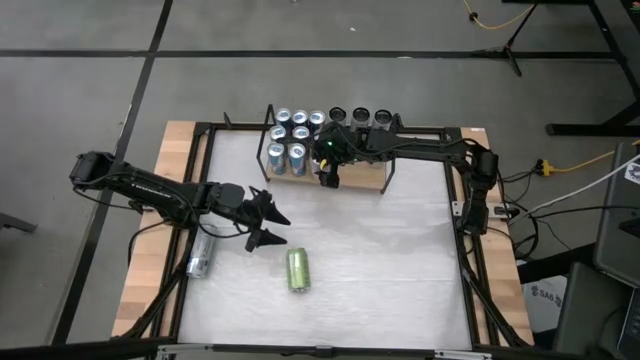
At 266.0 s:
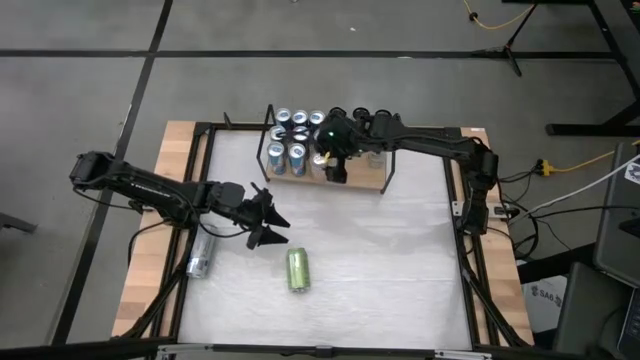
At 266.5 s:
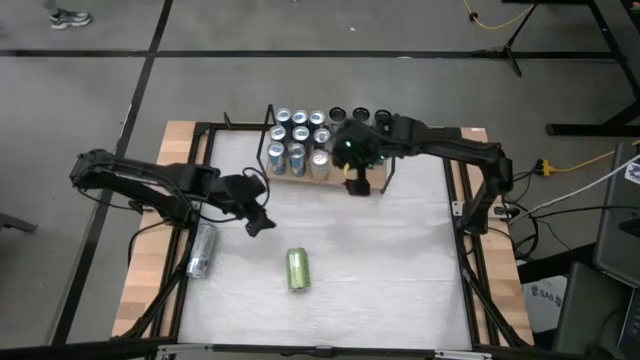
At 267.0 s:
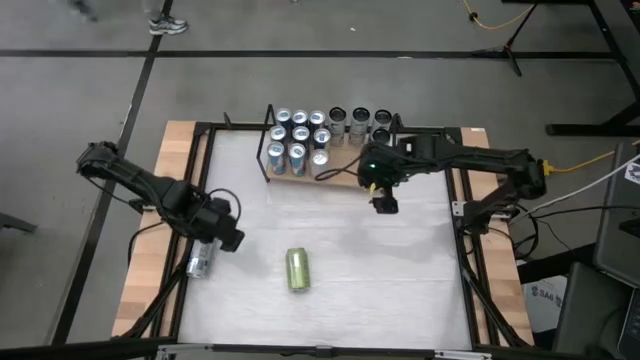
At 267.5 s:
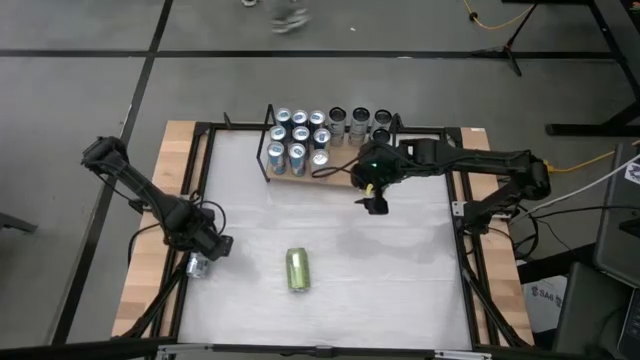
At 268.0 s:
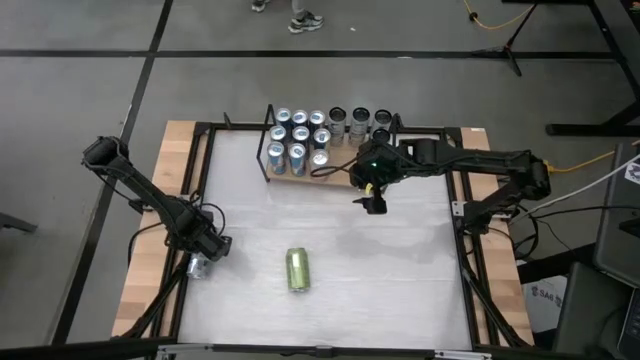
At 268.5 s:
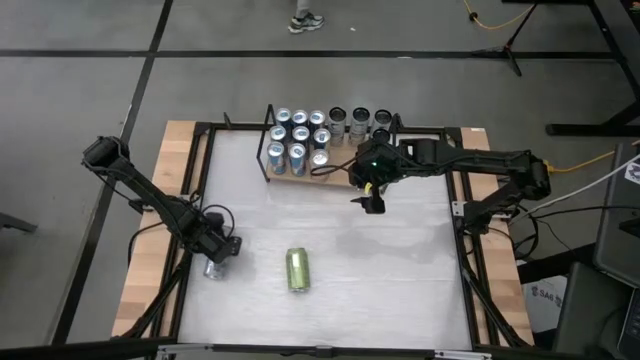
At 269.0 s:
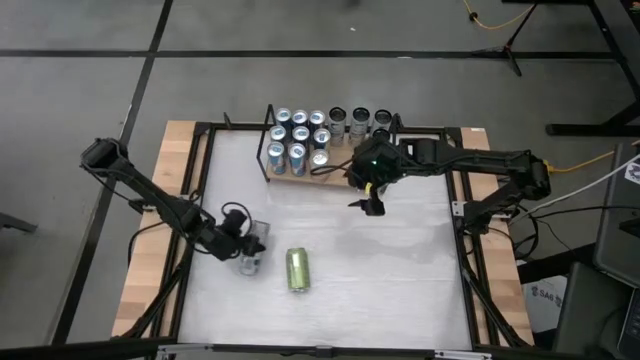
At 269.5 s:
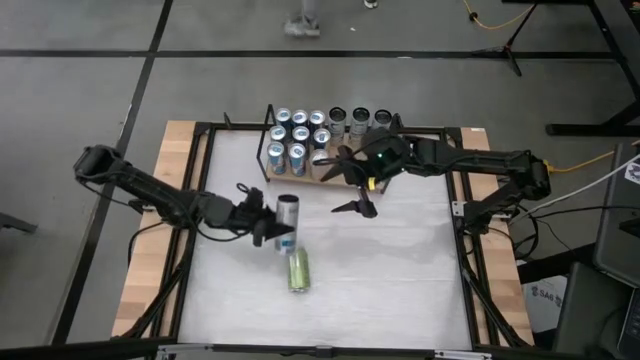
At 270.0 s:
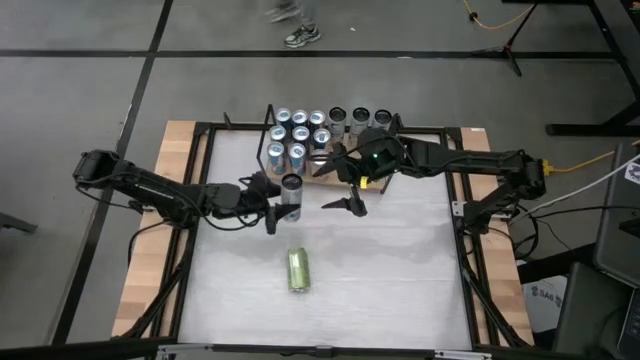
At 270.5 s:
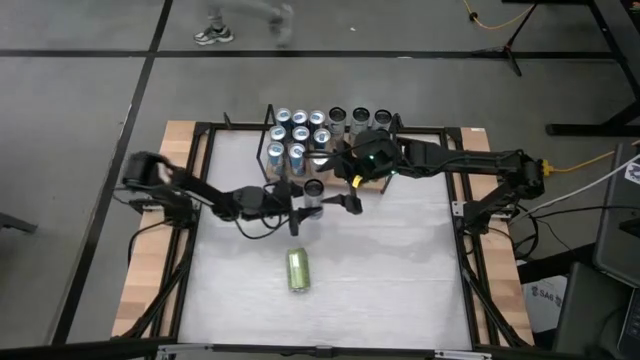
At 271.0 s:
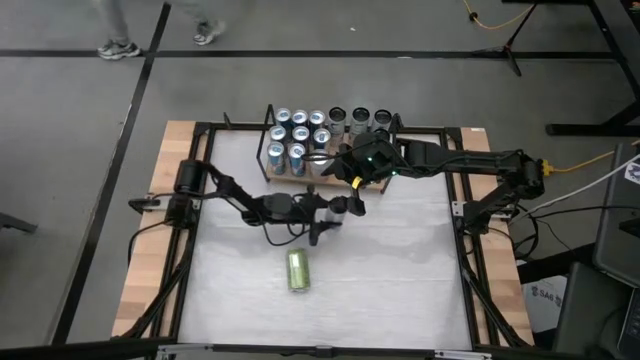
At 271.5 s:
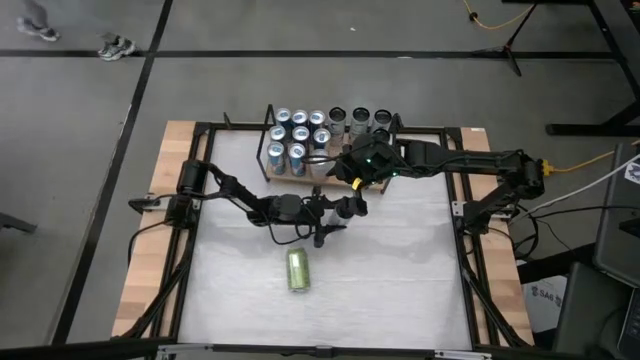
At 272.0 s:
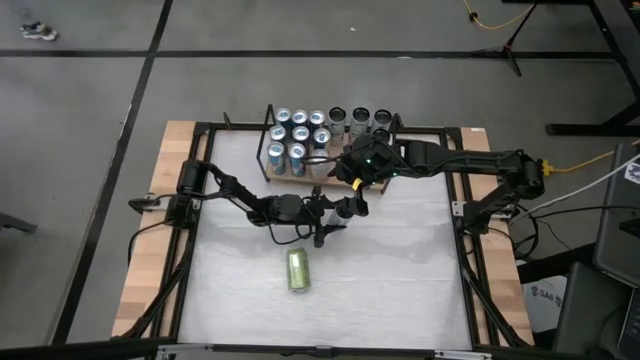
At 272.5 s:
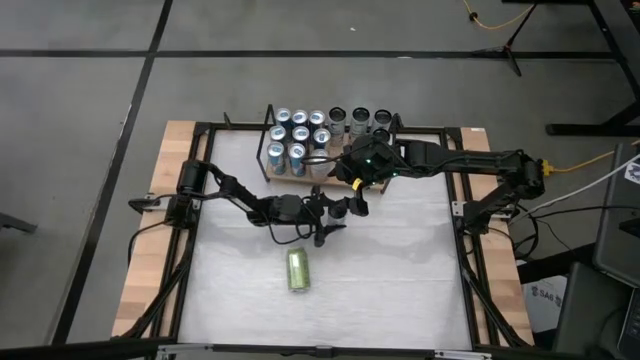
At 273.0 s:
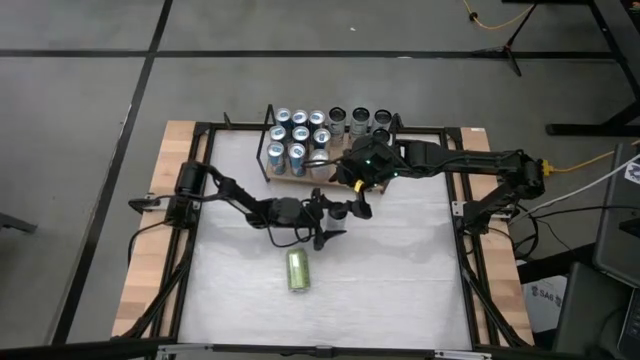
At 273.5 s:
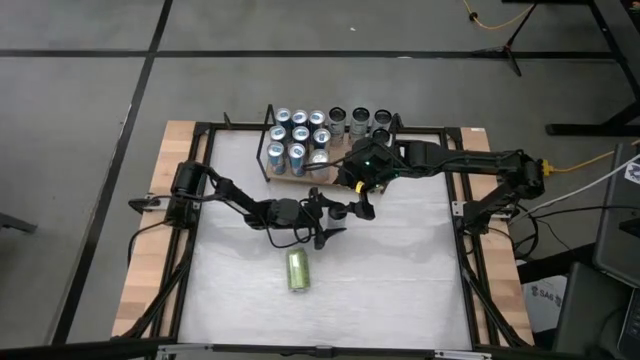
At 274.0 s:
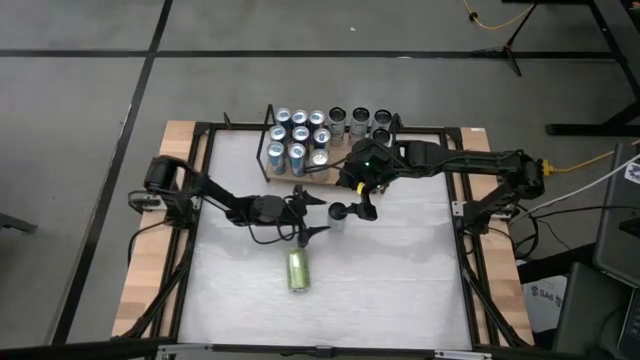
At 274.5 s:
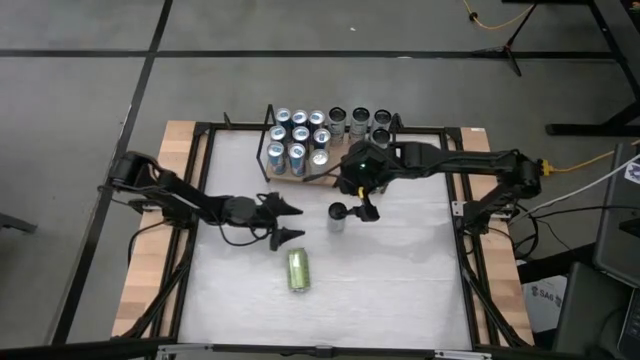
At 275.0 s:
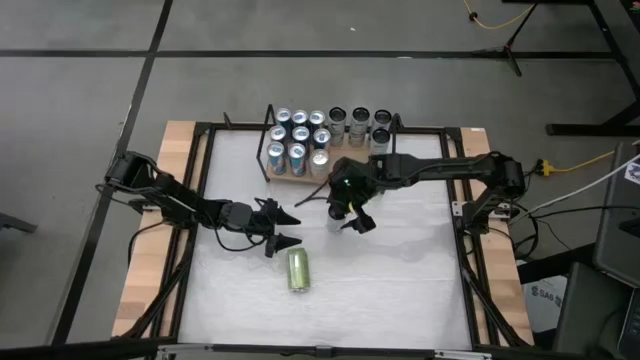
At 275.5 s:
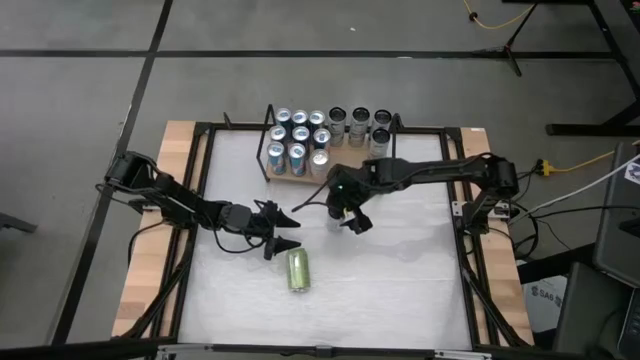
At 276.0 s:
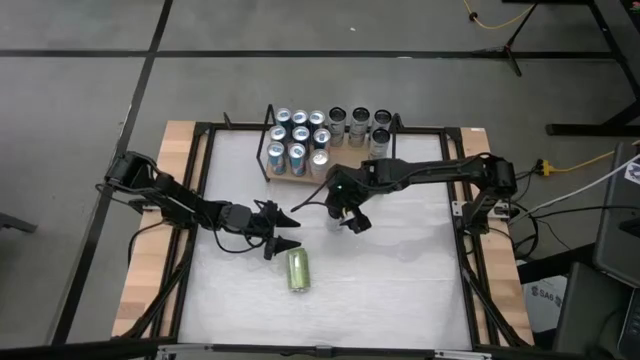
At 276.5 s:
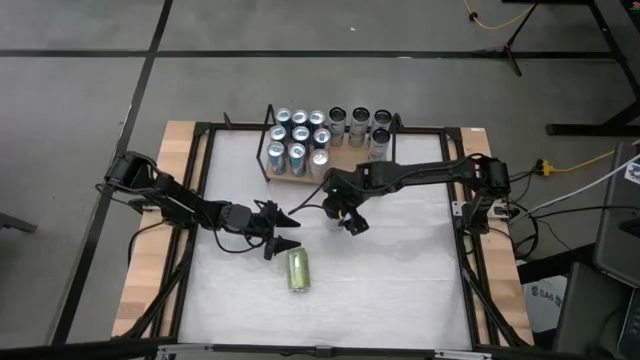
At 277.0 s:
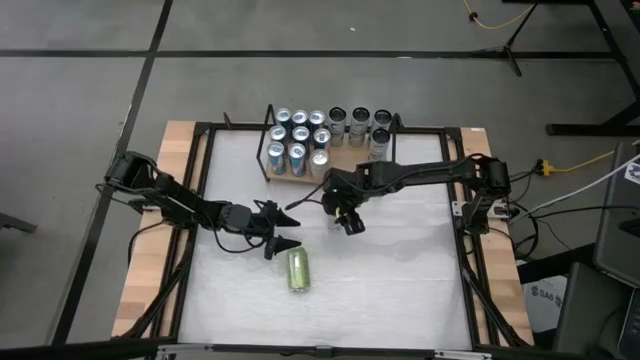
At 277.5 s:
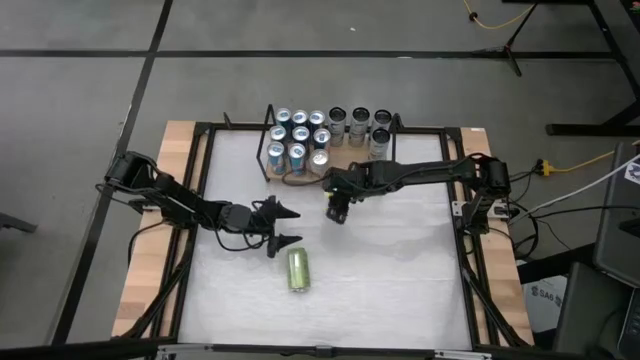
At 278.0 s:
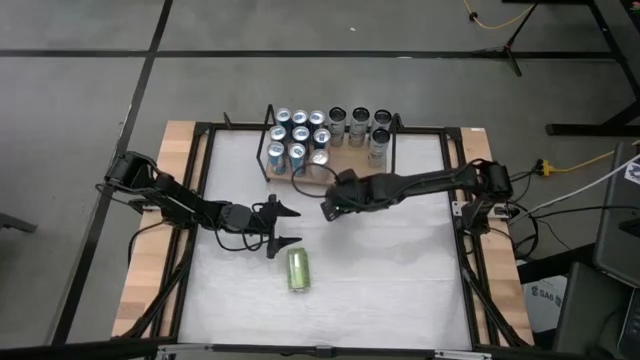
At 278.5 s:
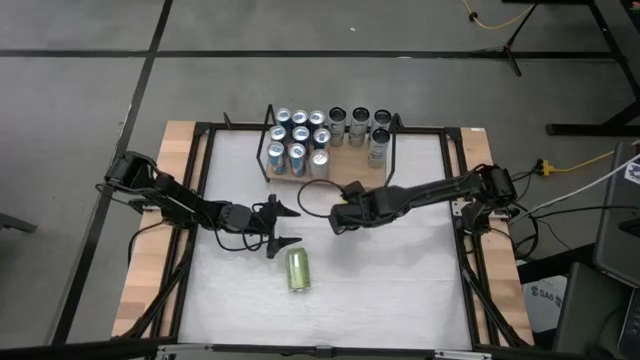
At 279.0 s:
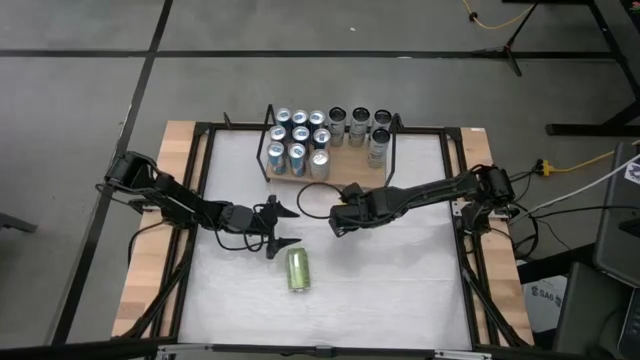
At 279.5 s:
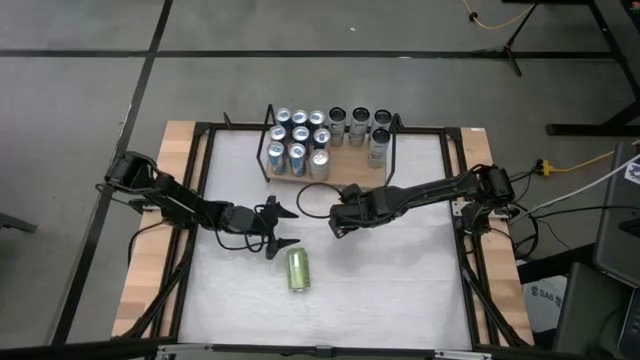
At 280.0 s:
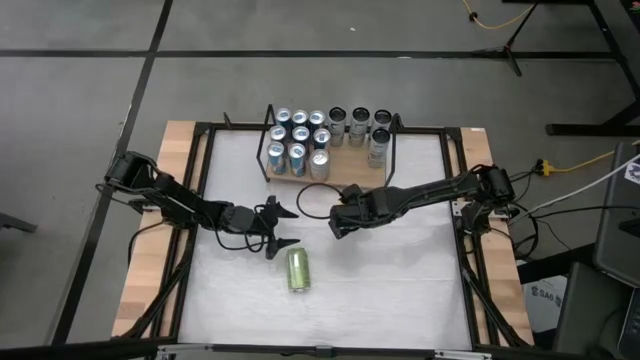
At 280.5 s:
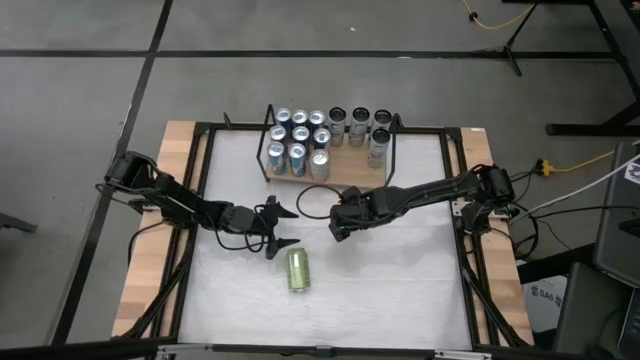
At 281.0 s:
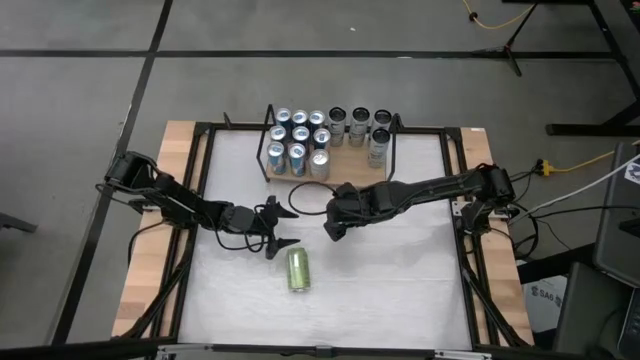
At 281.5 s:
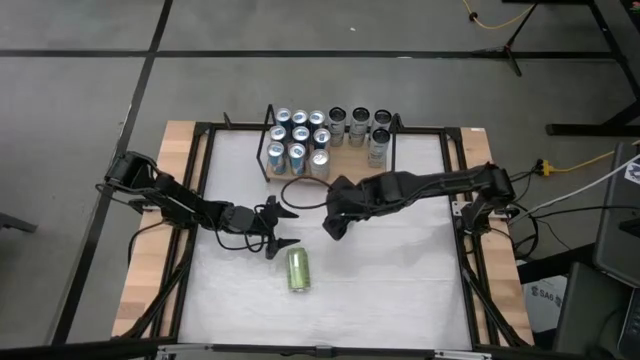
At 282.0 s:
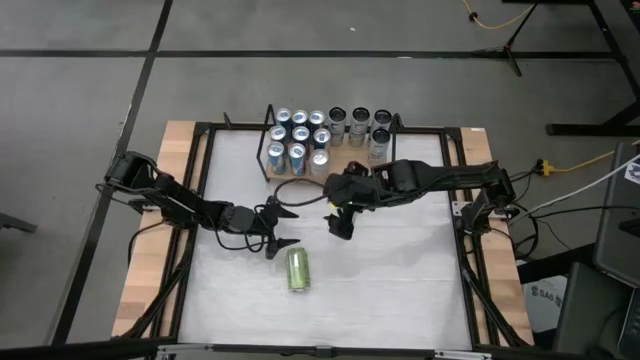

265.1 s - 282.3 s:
Task: Place canned beverage on shelf
Put the white blue soda can on the shelf aligned with the other white blue soda can

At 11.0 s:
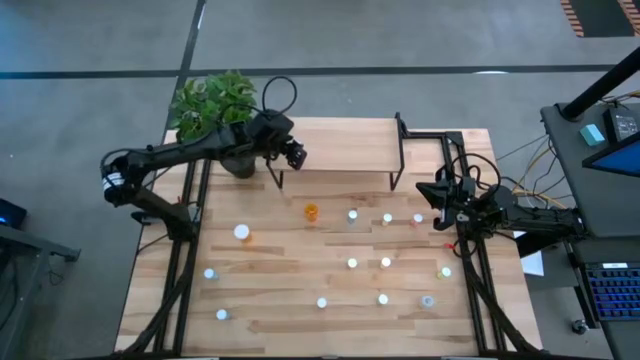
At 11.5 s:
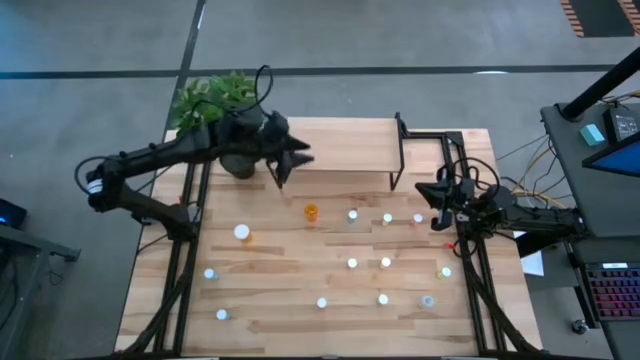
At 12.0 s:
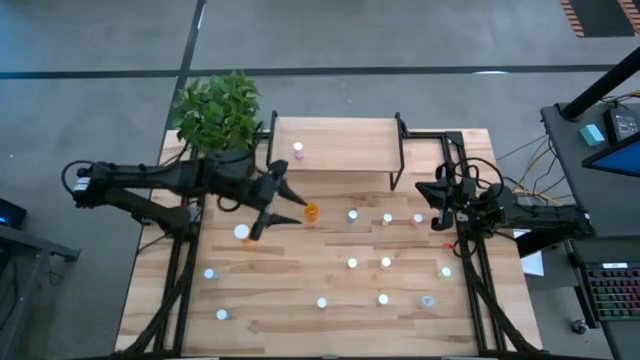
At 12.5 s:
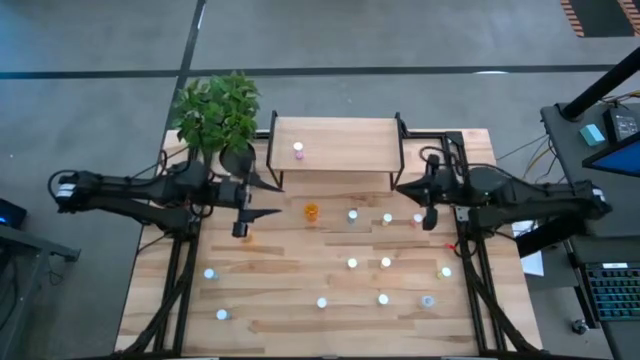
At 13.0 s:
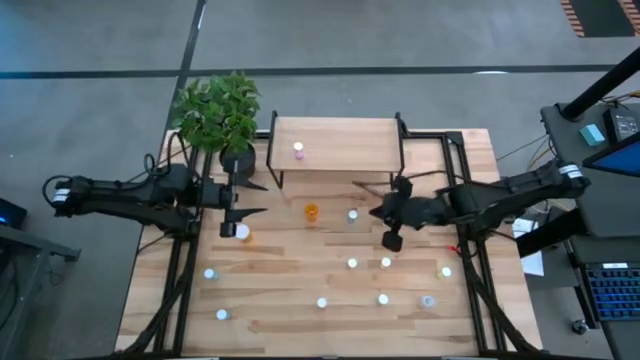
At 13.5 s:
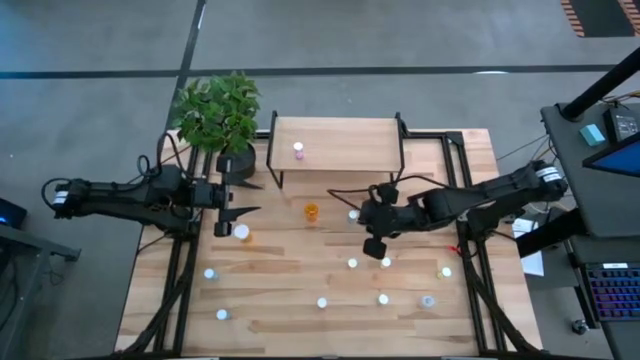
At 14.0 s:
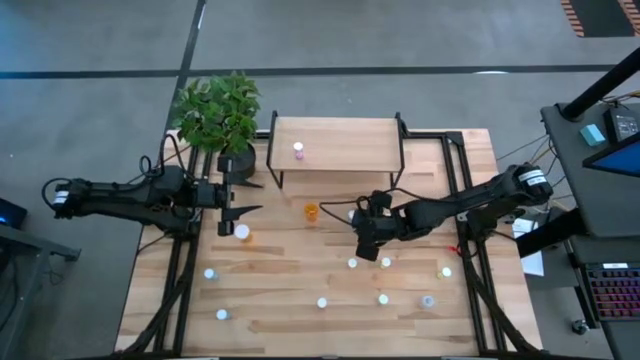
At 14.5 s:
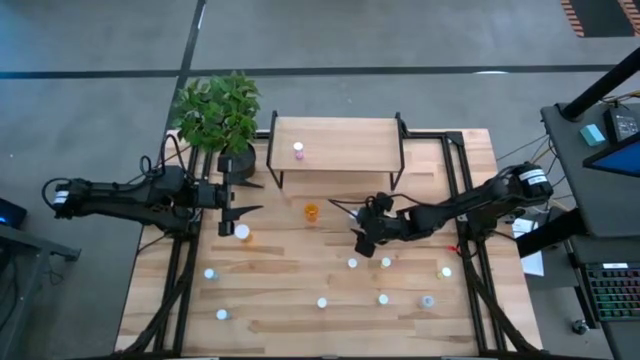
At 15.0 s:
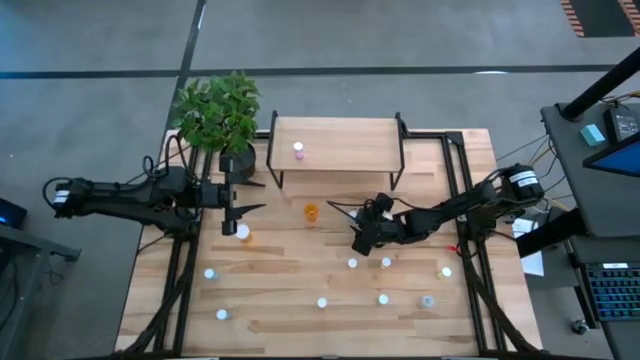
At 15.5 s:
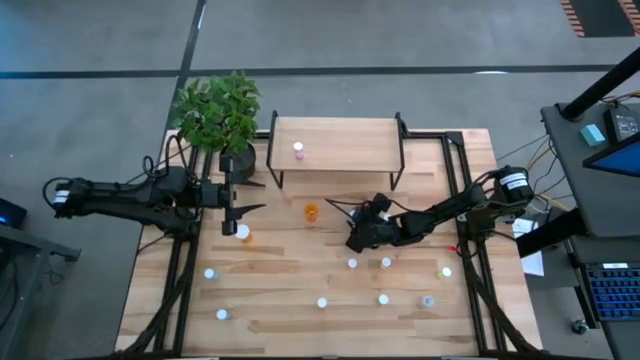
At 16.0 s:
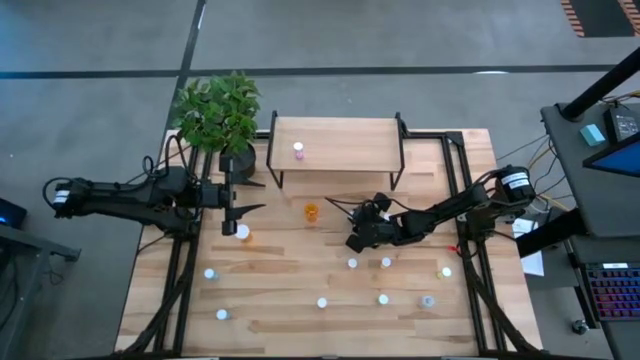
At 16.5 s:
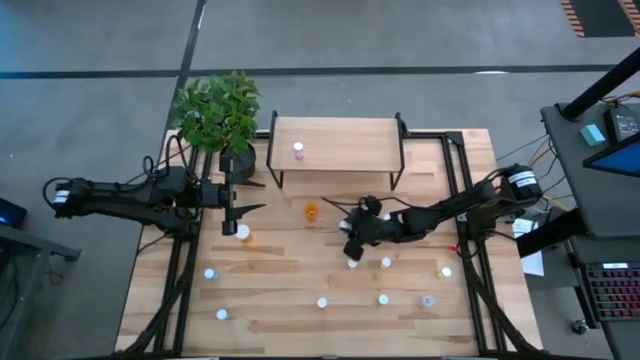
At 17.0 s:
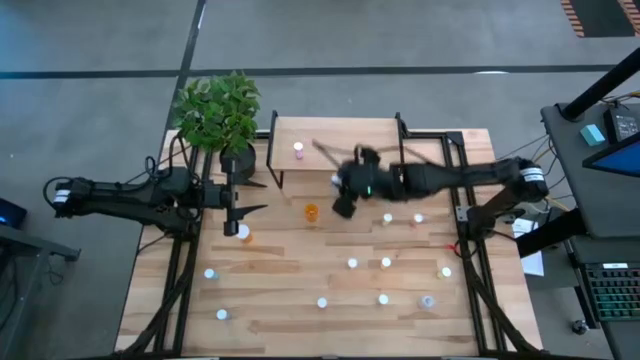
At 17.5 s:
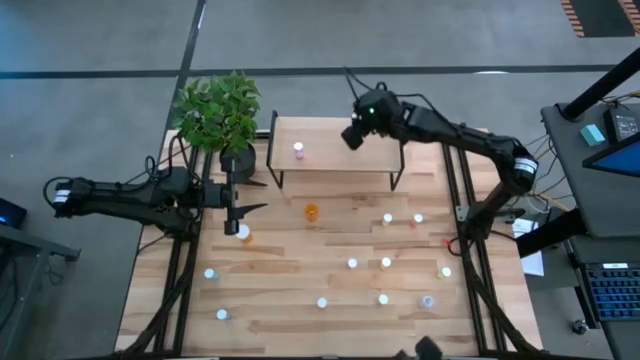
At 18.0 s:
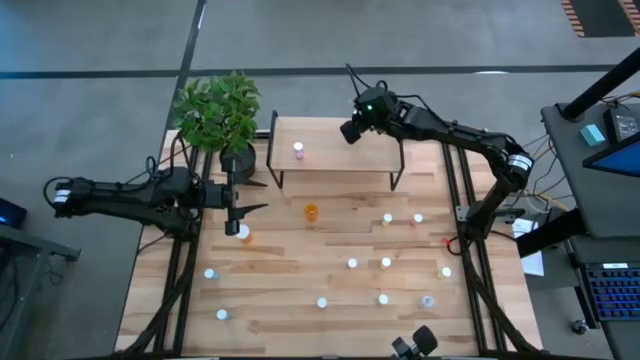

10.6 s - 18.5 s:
Task: Pick and place medicine bottles onto shelf by color
Put the blue pill bottle on the shelf
